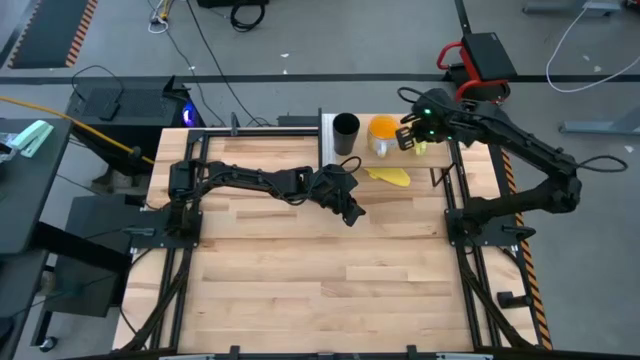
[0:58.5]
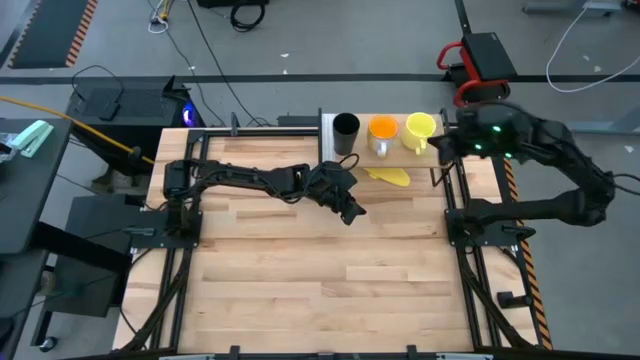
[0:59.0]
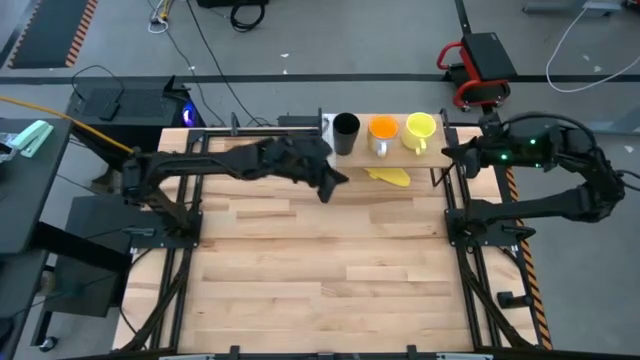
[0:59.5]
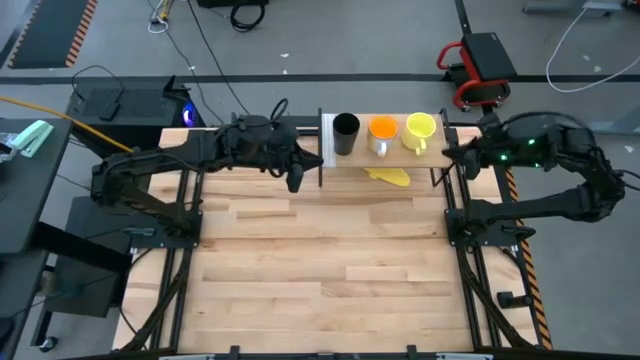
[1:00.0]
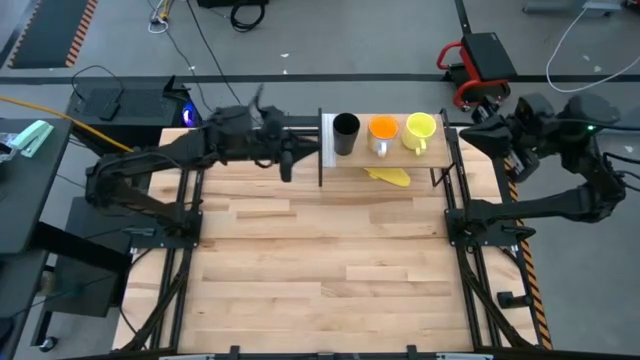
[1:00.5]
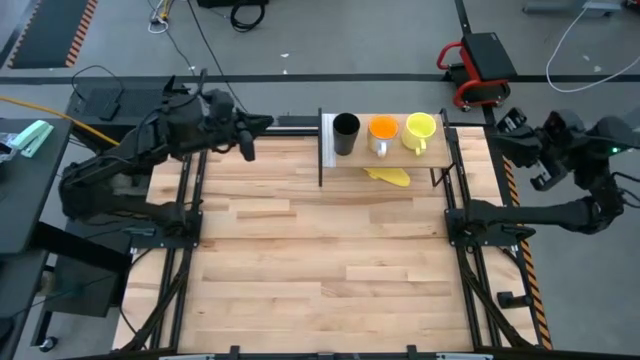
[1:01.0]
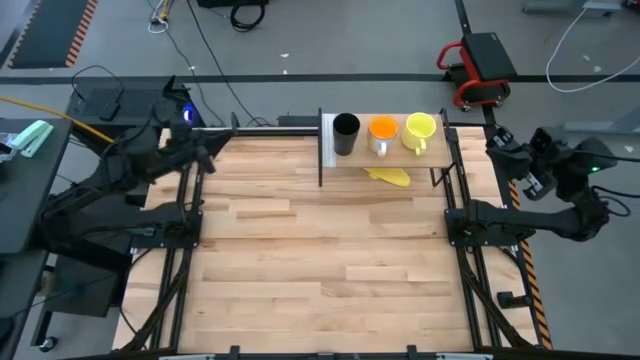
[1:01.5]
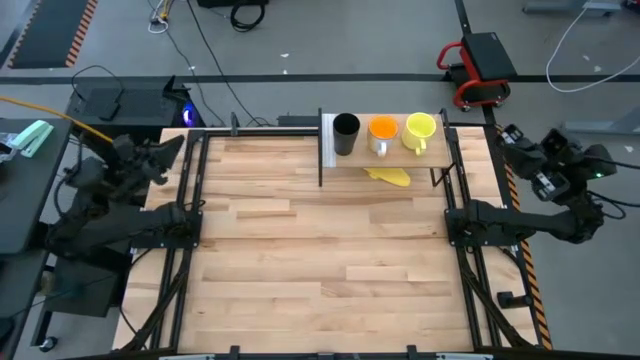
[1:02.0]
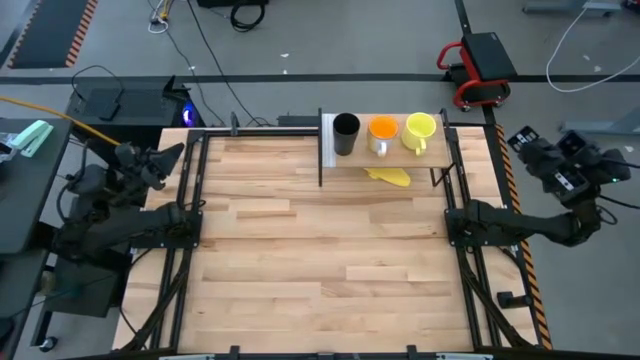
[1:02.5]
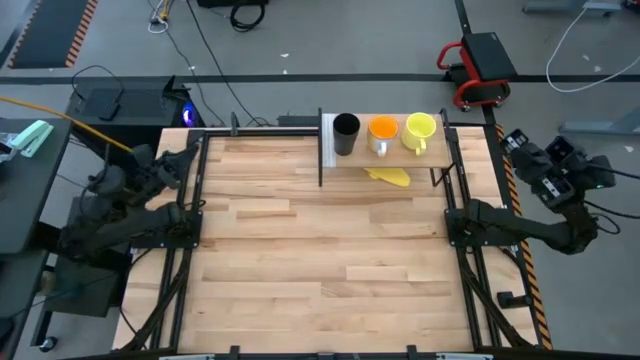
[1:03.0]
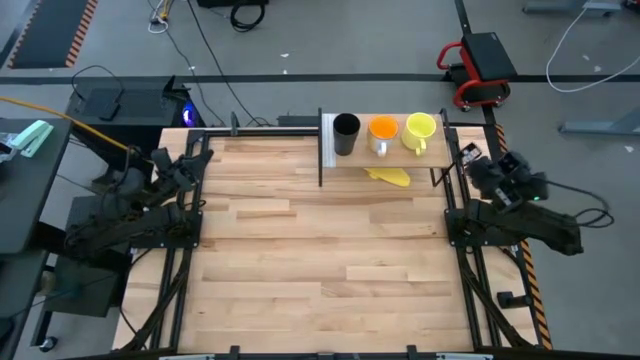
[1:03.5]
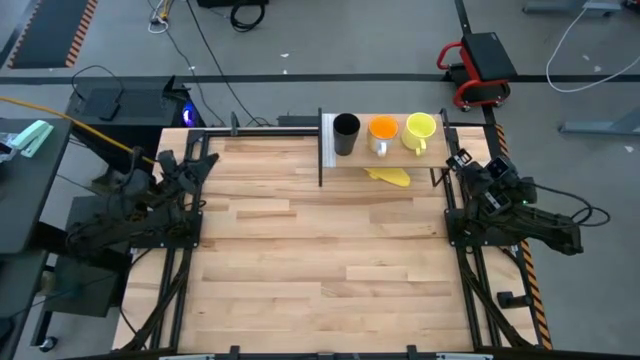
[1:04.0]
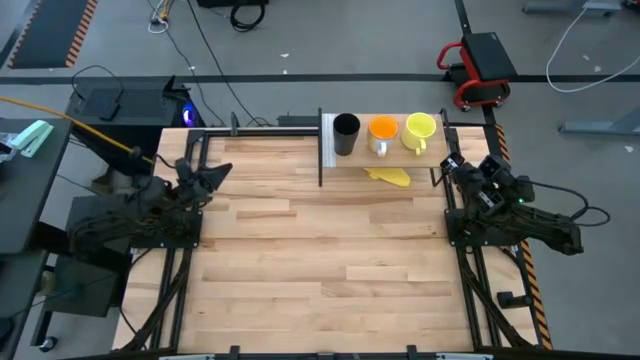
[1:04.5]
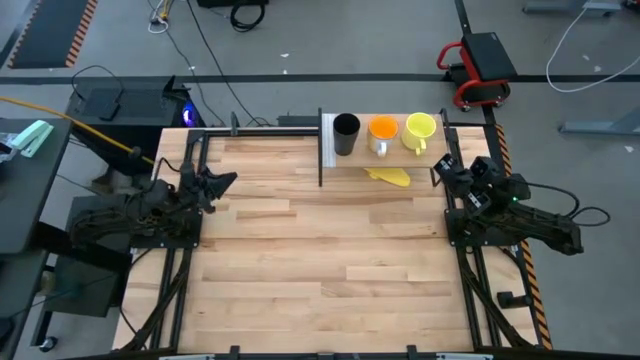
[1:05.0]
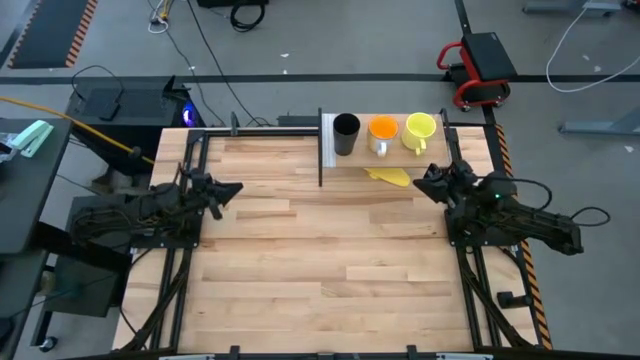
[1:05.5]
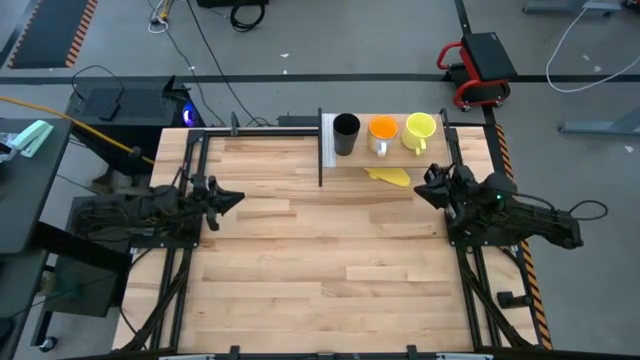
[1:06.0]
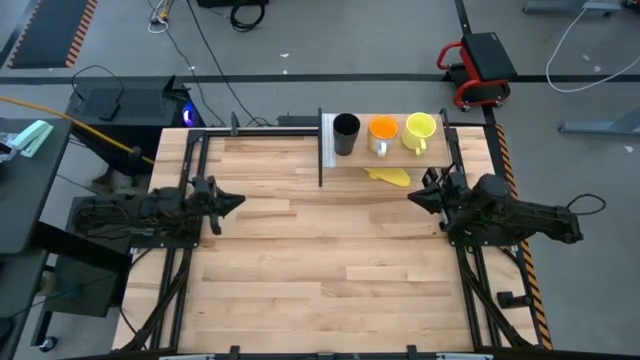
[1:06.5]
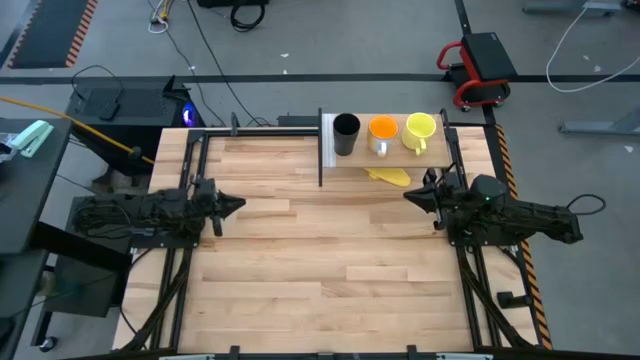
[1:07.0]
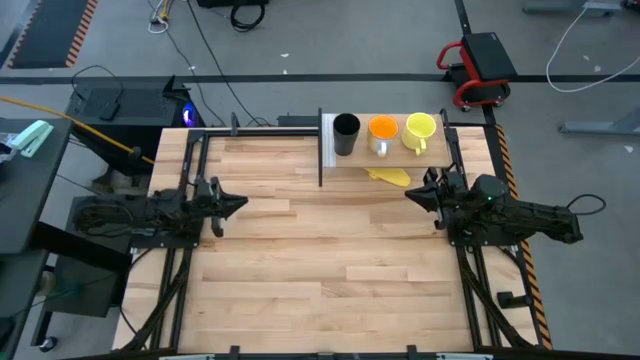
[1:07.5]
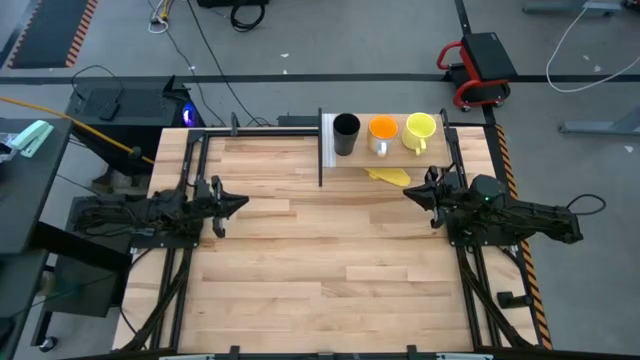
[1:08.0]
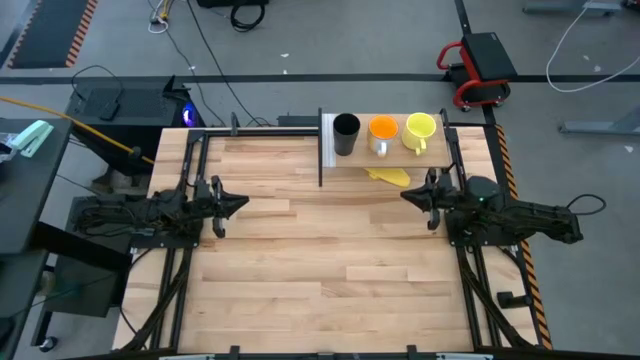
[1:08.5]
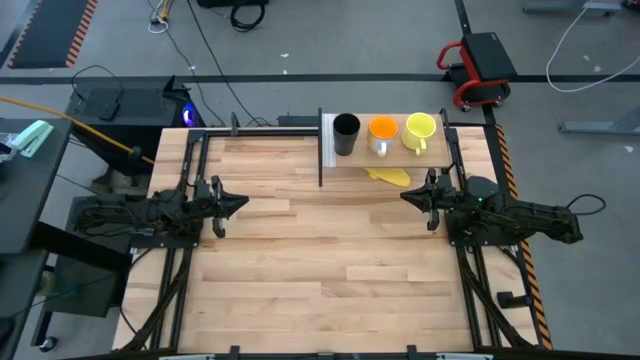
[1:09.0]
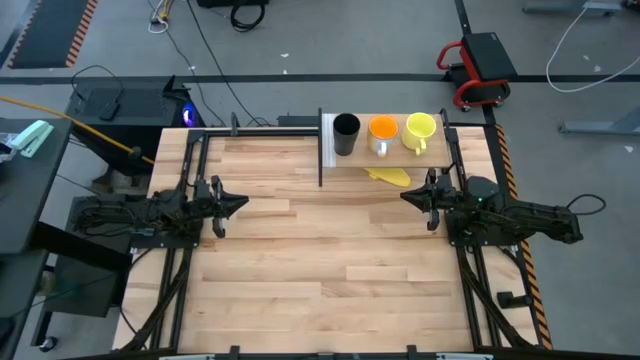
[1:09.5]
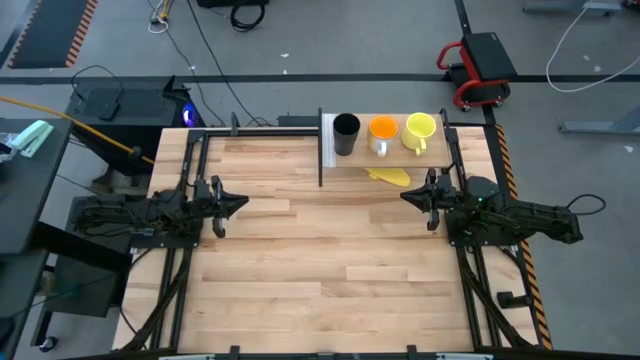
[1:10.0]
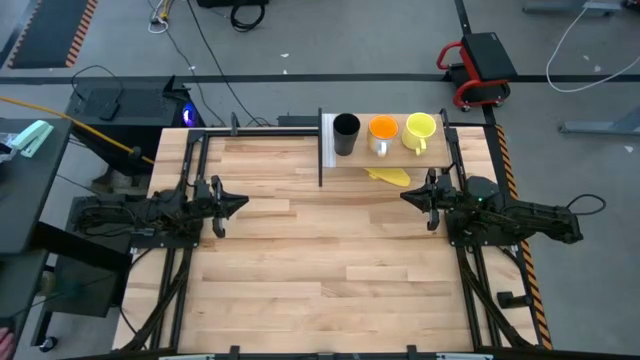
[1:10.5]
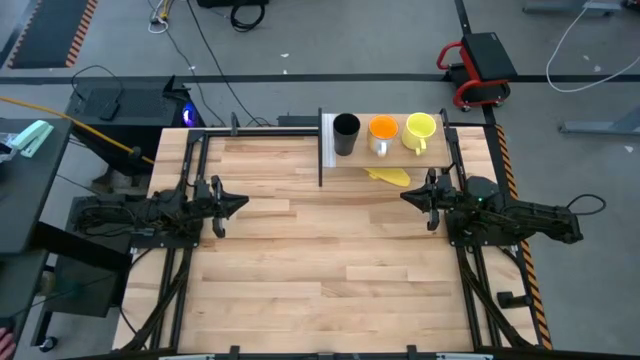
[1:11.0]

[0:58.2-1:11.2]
Task: Stack small to large cups/mugs on shelf
Return to Home Position
